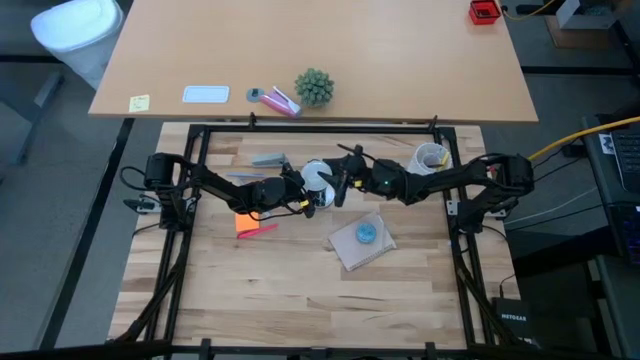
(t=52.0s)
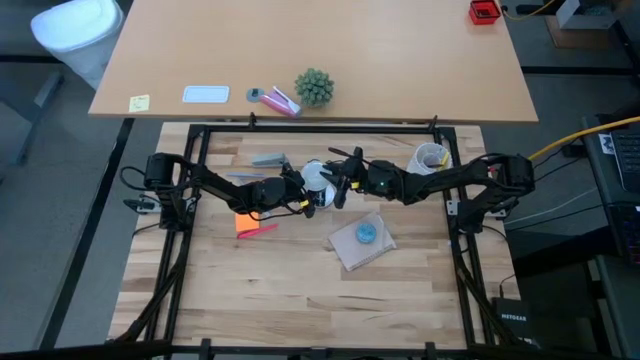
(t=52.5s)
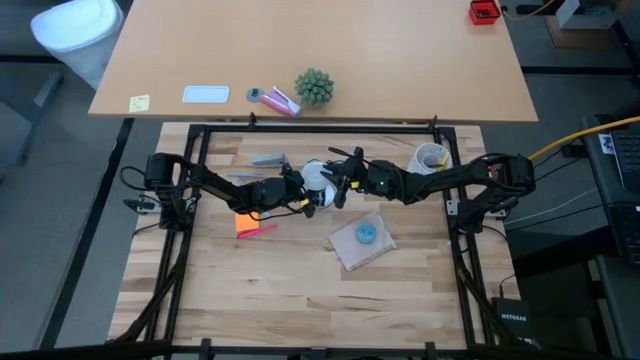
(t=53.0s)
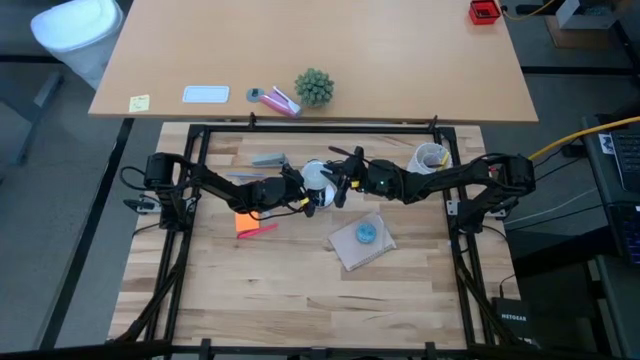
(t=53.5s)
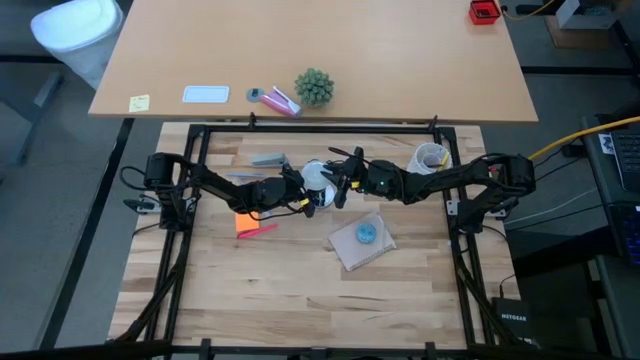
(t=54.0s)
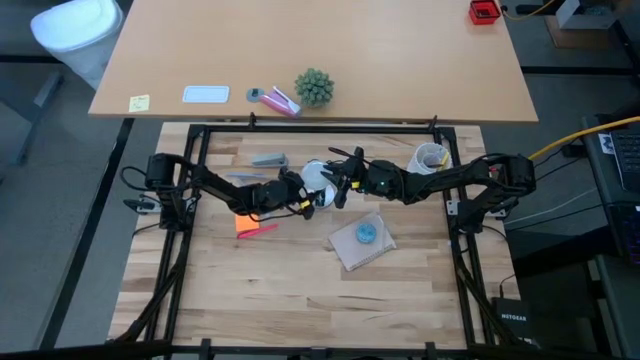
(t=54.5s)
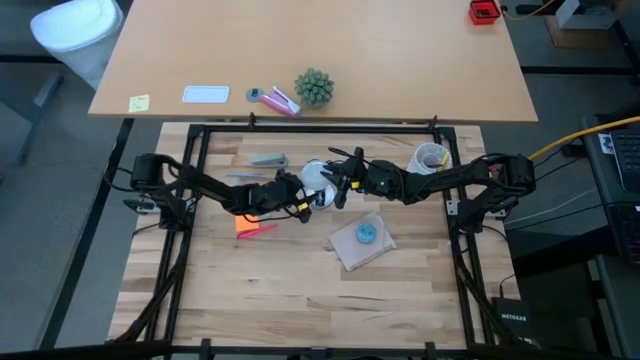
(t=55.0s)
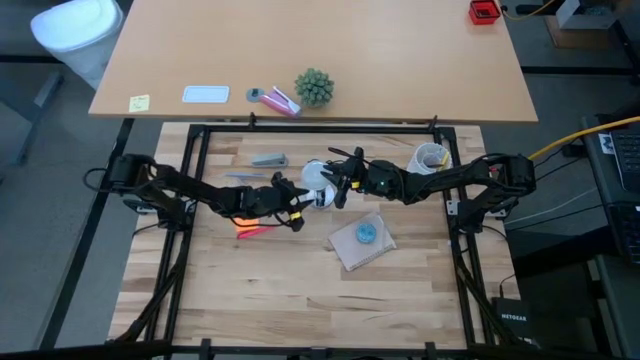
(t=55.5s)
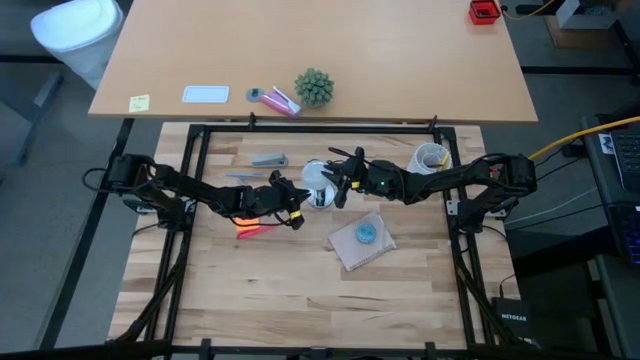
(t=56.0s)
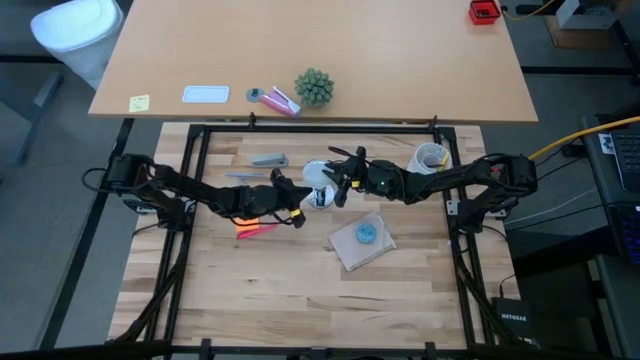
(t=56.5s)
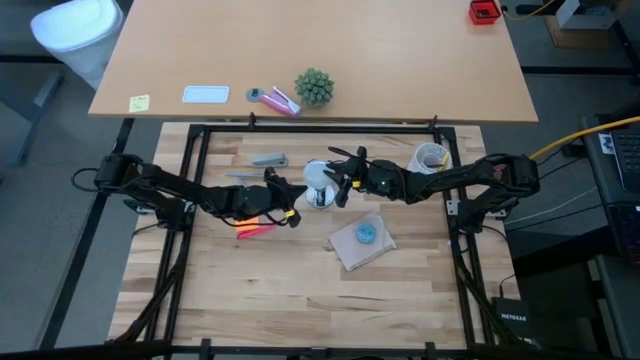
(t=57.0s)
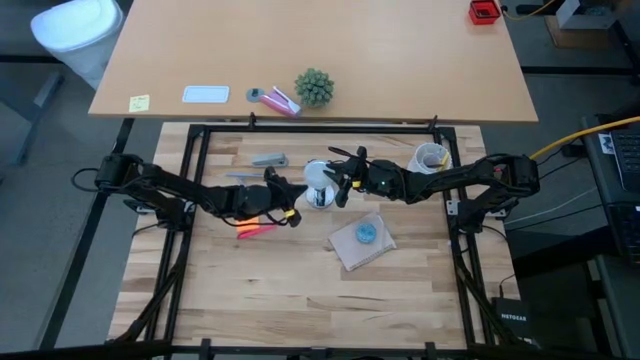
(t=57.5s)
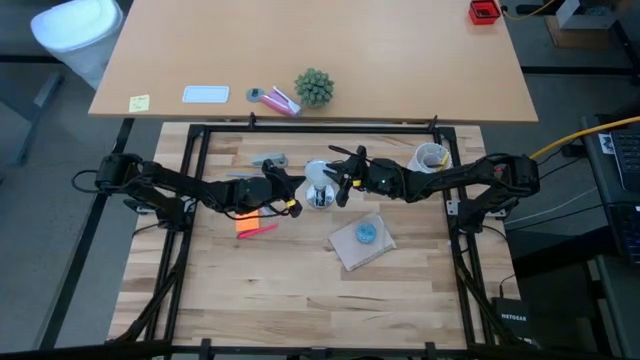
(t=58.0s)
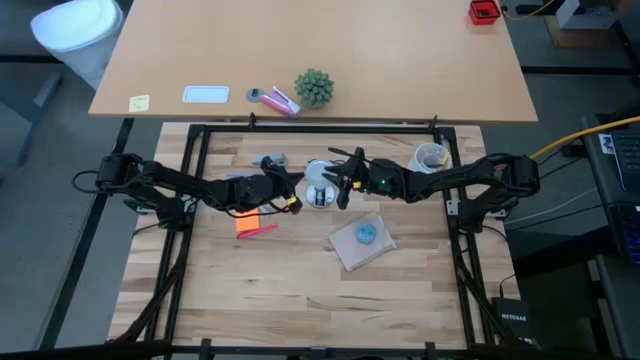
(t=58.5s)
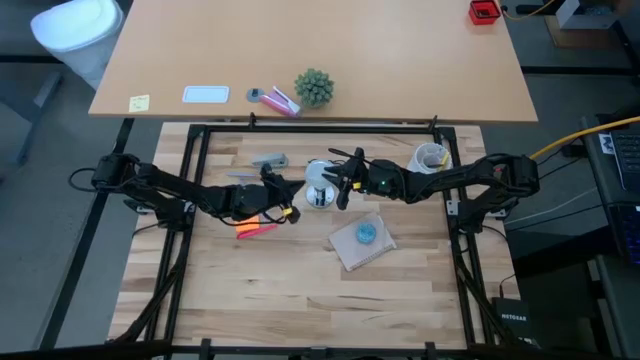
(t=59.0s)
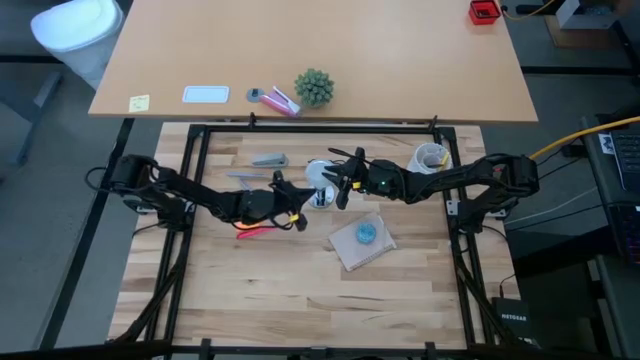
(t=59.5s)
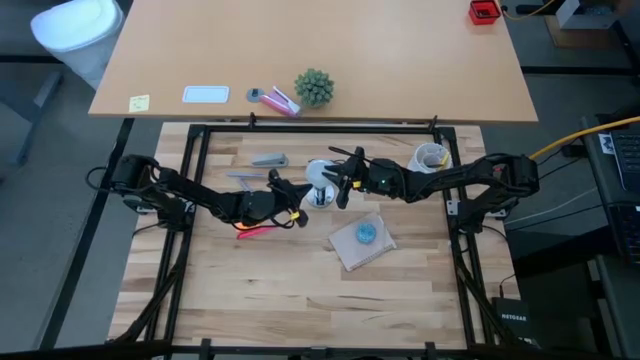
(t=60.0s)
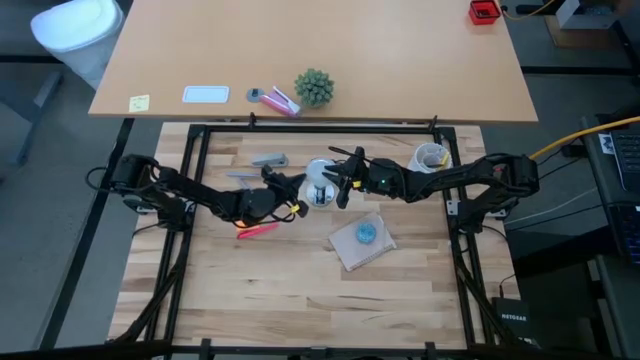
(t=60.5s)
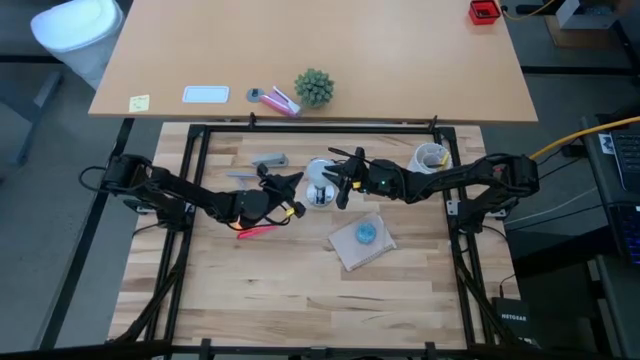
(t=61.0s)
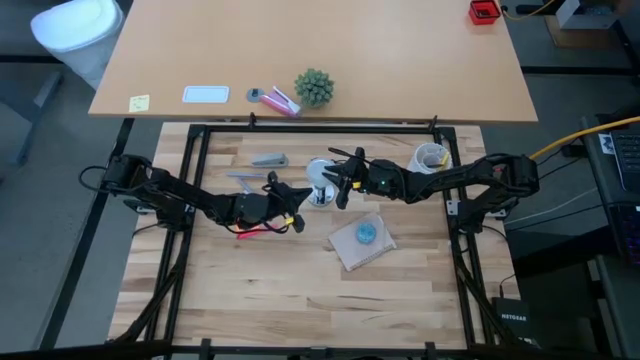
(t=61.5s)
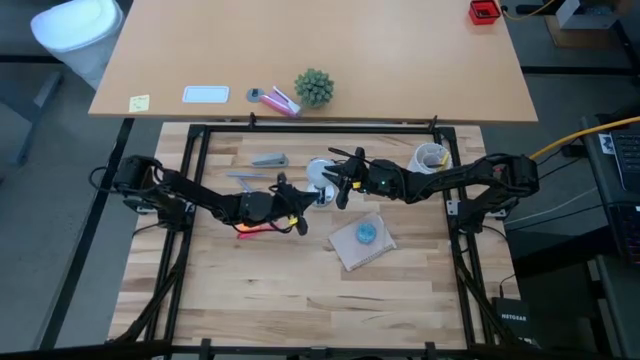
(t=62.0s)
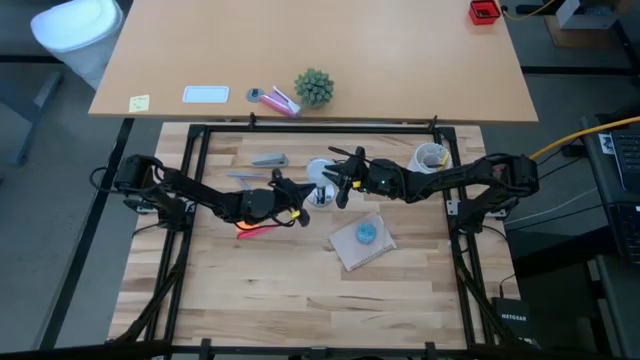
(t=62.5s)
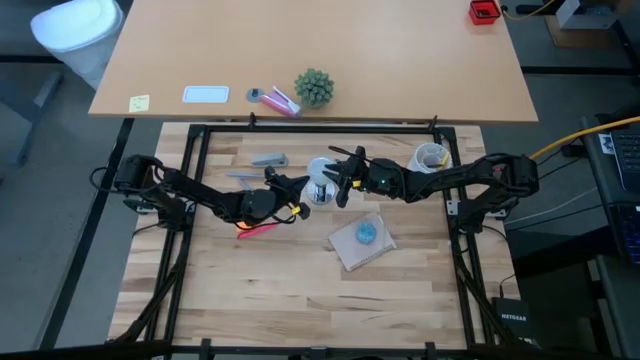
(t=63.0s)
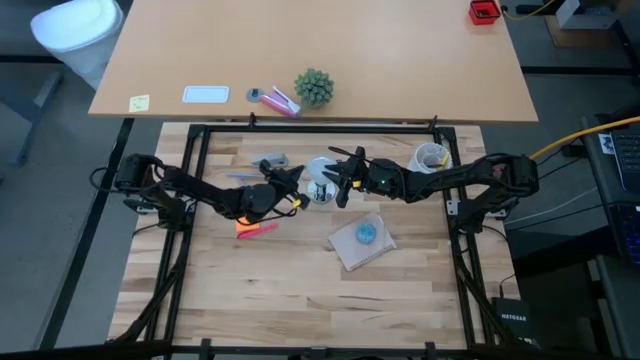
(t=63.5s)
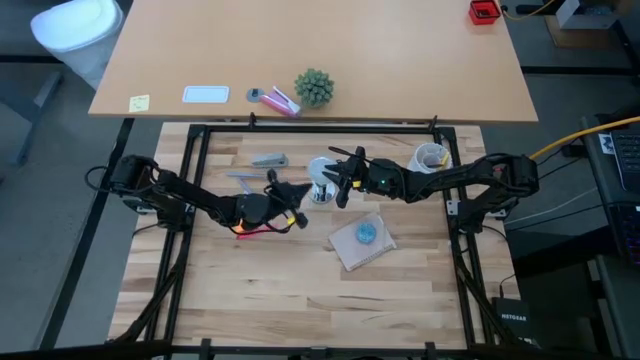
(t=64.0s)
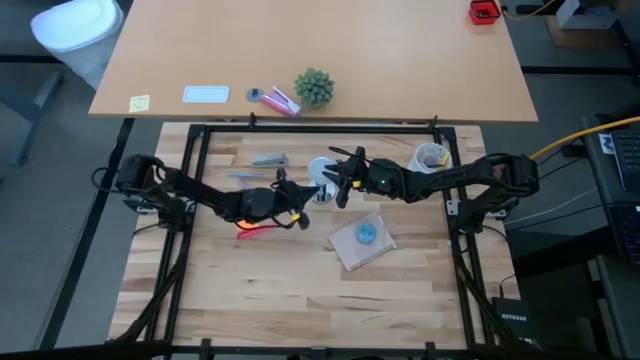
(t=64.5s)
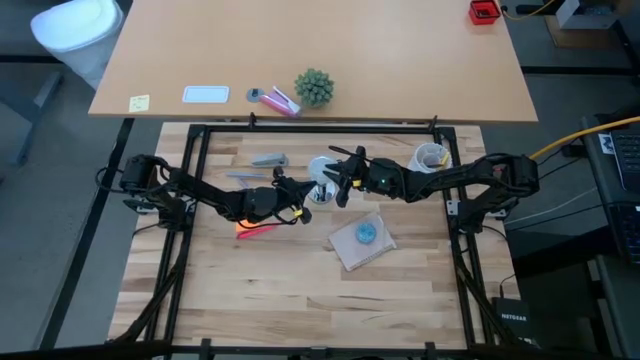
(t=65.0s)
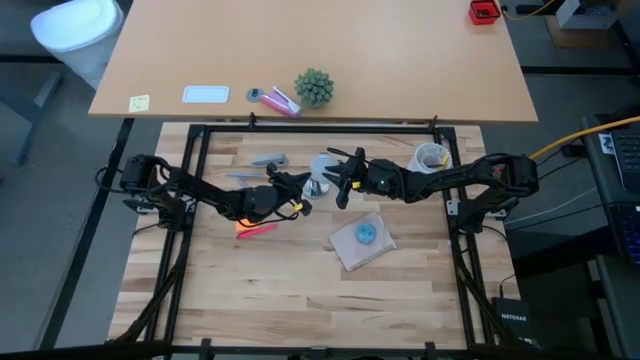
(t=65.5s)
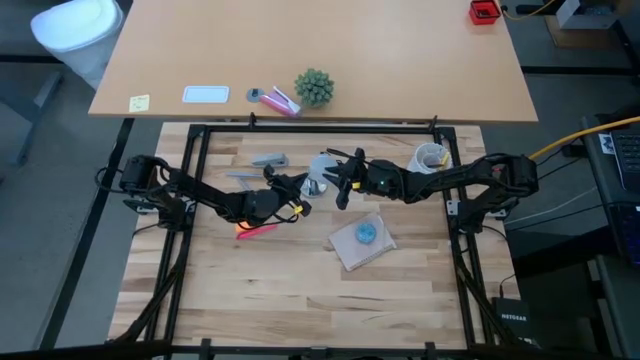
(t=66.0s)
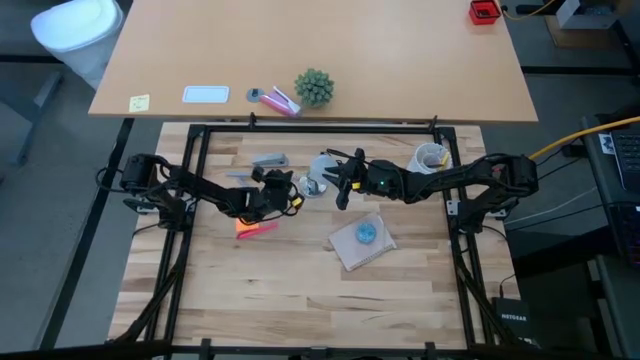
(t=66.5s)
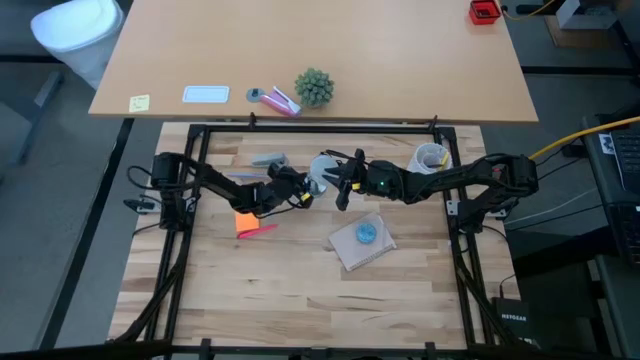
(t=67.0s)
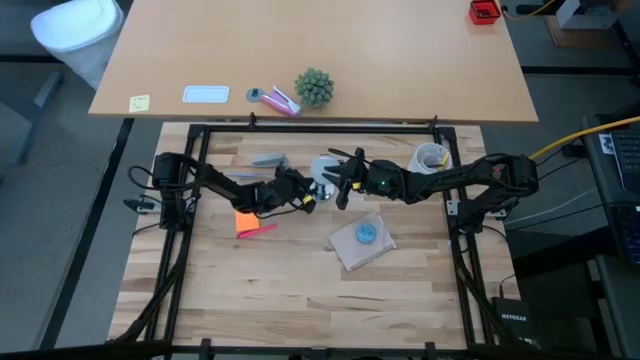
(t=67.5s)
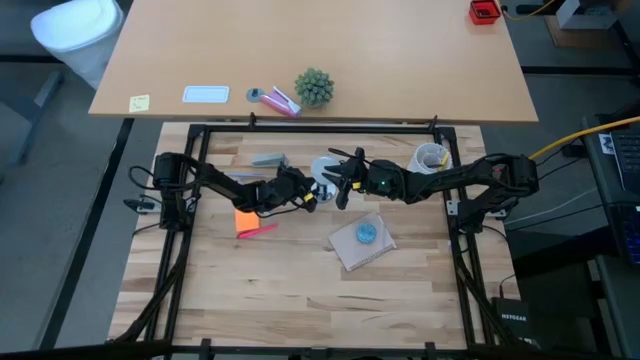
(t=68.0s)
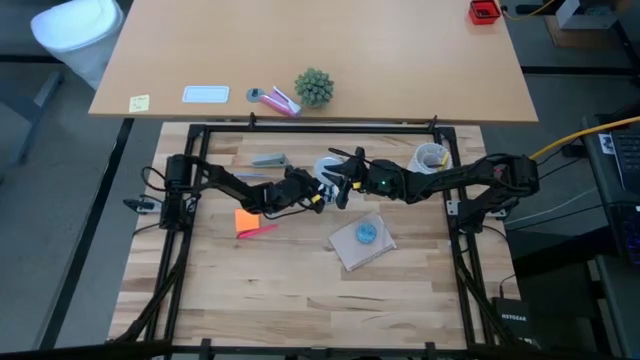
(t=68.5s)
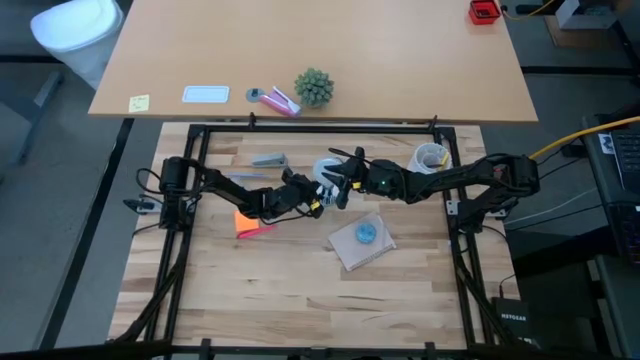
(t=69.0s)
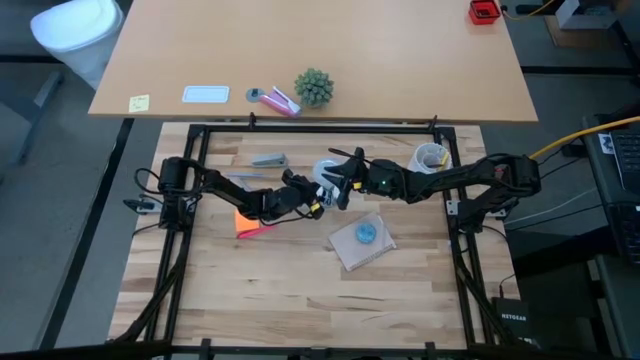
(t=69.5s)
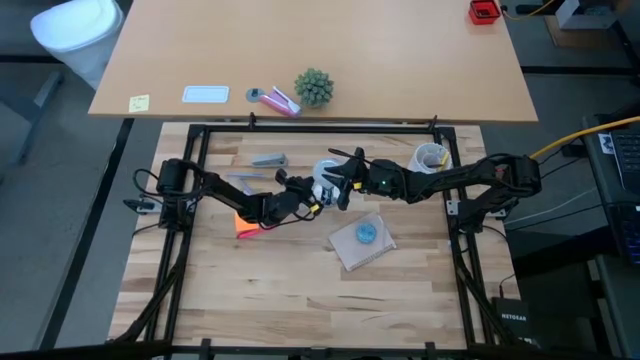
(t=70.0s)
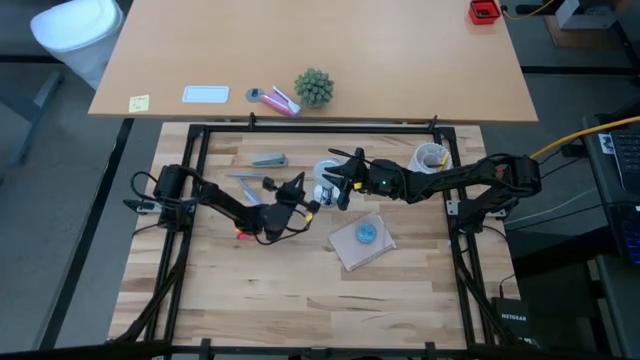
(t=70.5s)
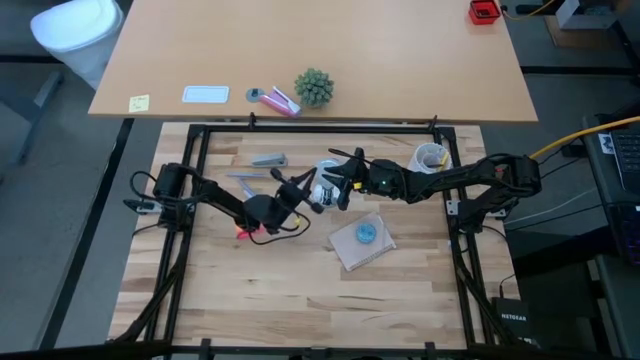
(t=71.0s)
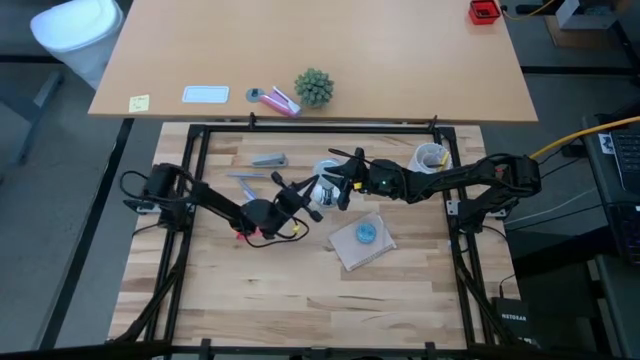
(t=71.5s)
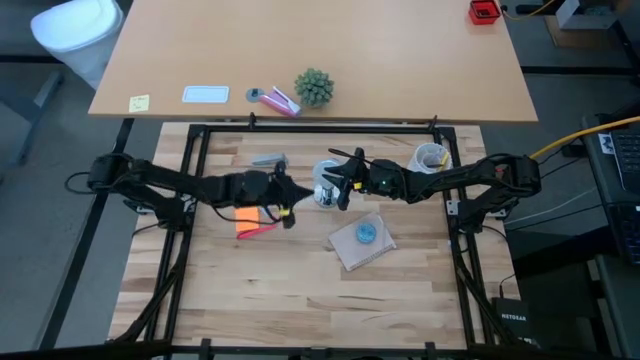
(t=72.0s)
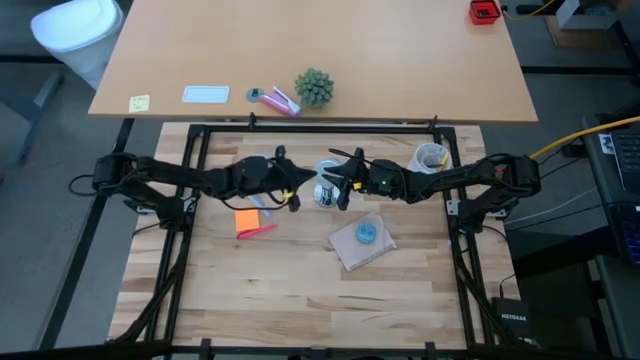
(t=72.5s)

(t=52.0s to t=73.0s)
Task: Screw lightbulb
Insert the lightbulb into the lamp
